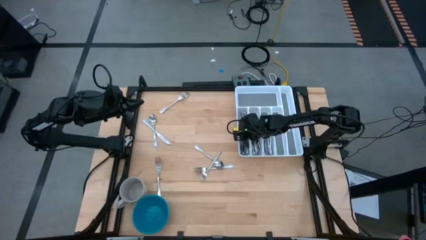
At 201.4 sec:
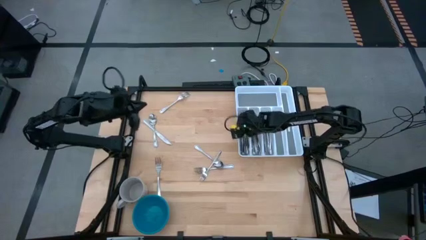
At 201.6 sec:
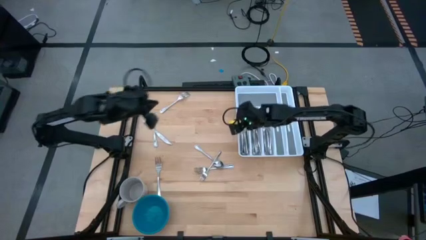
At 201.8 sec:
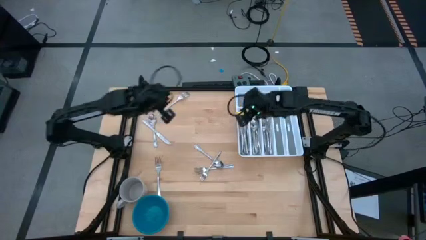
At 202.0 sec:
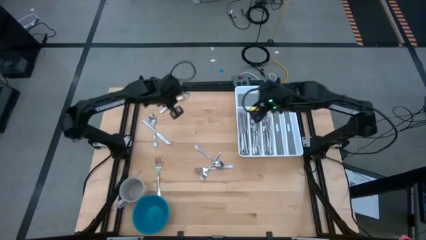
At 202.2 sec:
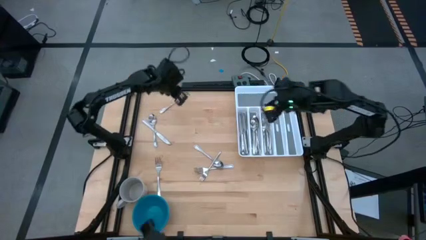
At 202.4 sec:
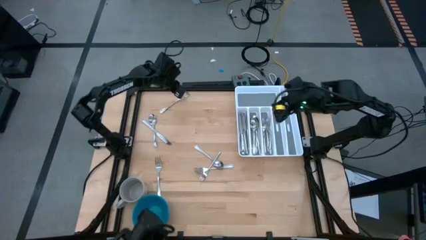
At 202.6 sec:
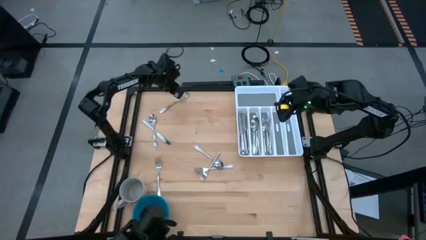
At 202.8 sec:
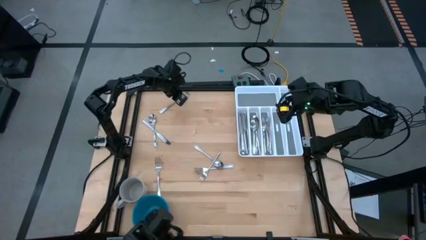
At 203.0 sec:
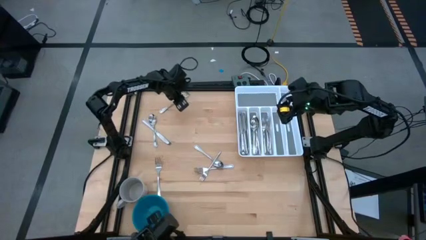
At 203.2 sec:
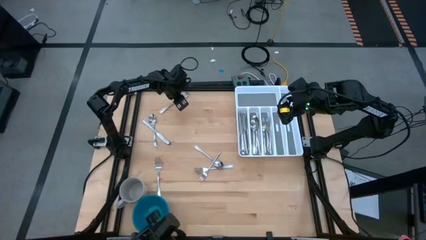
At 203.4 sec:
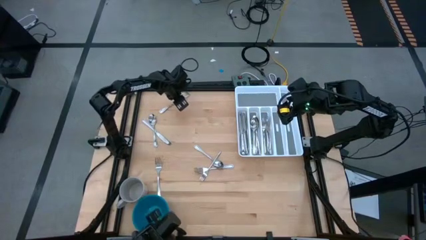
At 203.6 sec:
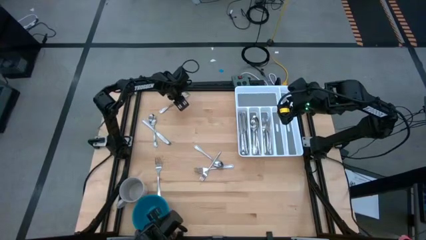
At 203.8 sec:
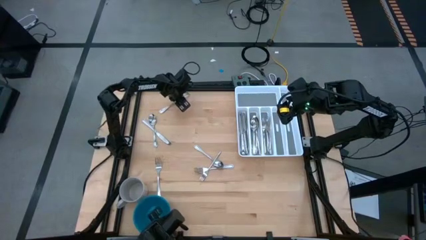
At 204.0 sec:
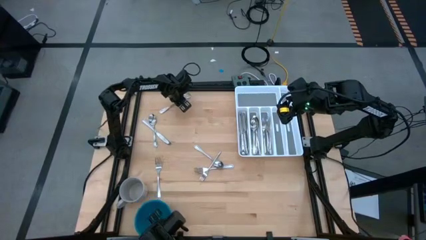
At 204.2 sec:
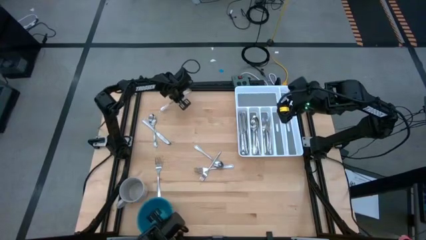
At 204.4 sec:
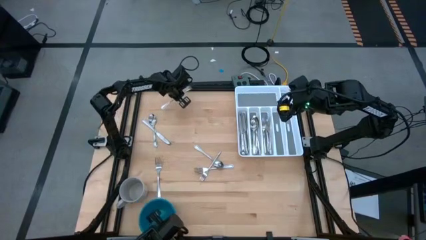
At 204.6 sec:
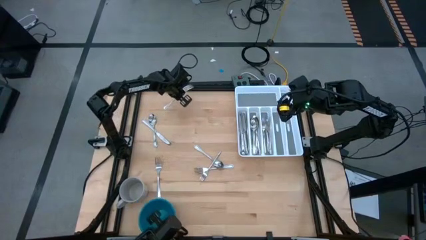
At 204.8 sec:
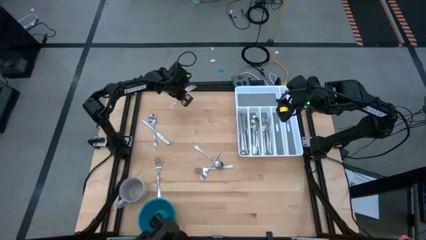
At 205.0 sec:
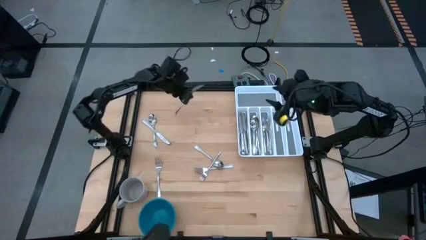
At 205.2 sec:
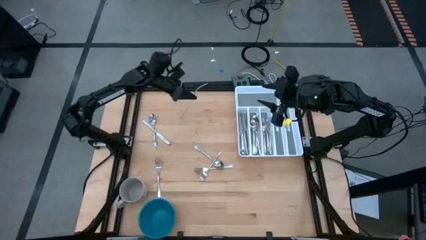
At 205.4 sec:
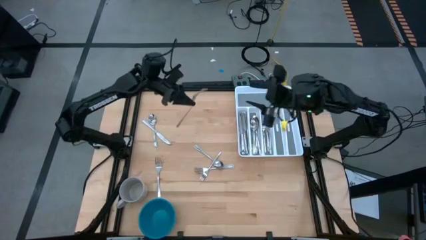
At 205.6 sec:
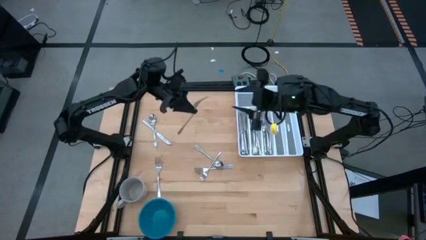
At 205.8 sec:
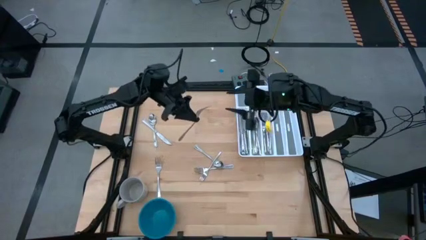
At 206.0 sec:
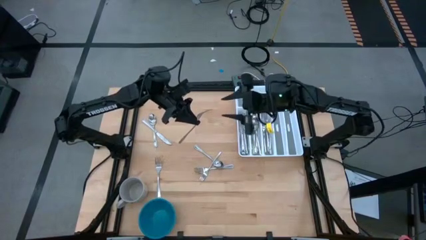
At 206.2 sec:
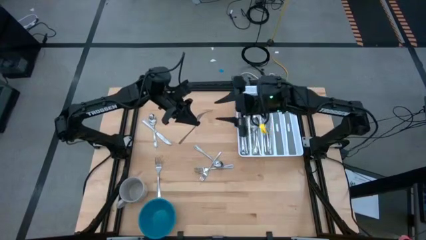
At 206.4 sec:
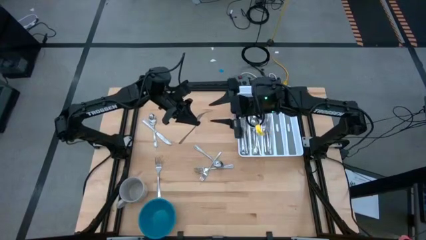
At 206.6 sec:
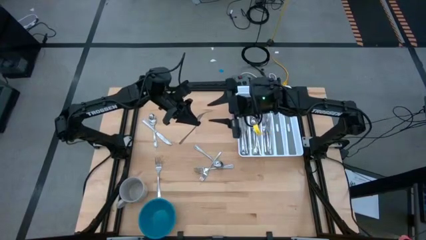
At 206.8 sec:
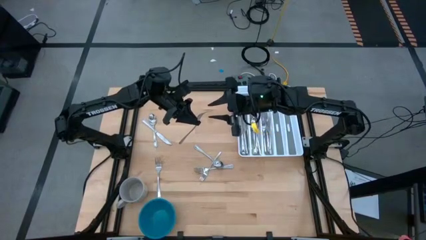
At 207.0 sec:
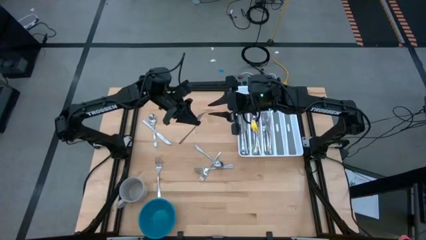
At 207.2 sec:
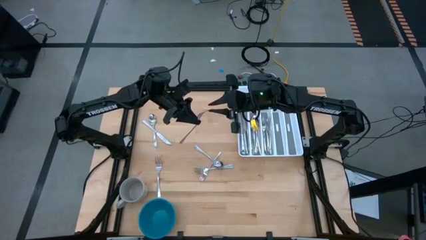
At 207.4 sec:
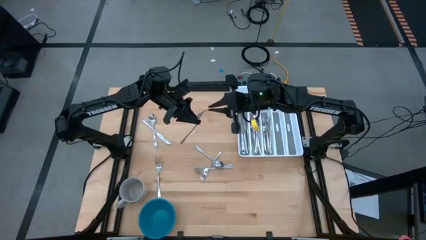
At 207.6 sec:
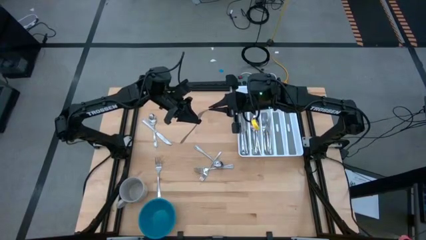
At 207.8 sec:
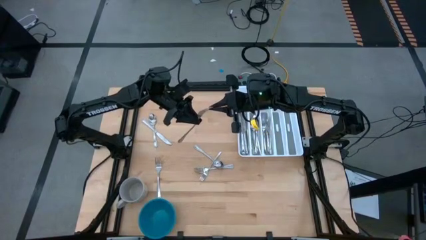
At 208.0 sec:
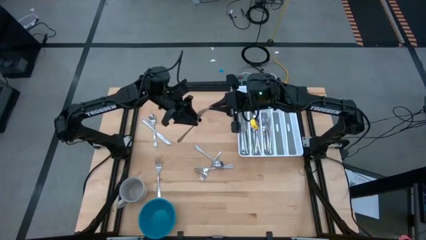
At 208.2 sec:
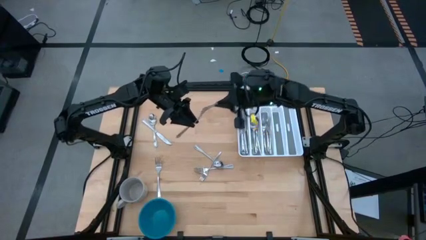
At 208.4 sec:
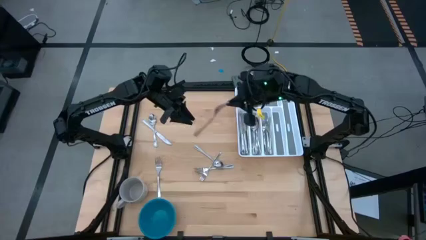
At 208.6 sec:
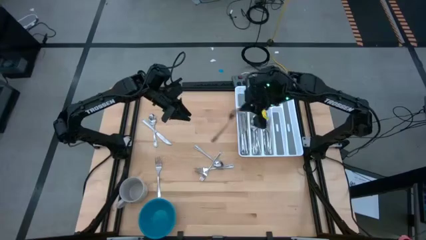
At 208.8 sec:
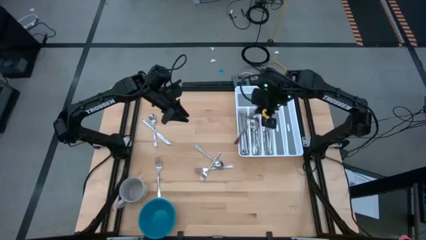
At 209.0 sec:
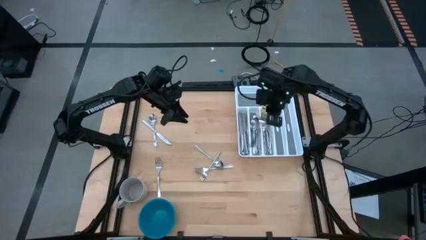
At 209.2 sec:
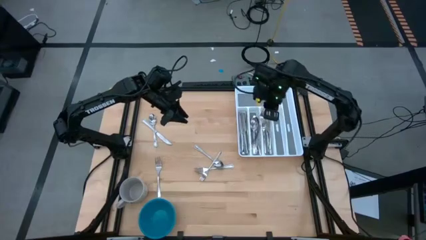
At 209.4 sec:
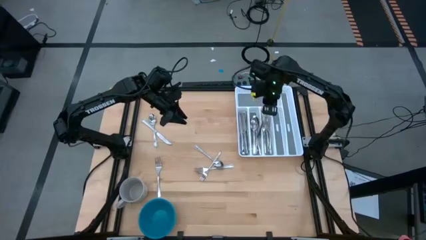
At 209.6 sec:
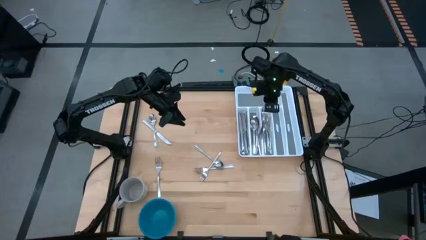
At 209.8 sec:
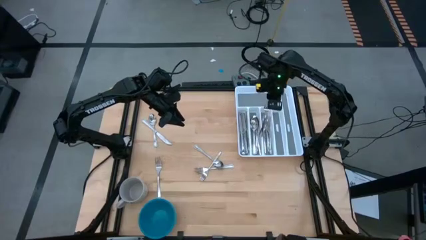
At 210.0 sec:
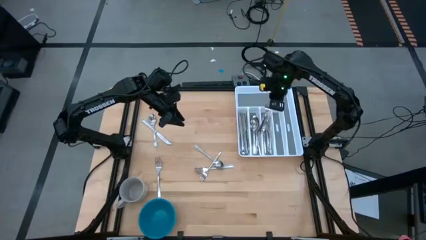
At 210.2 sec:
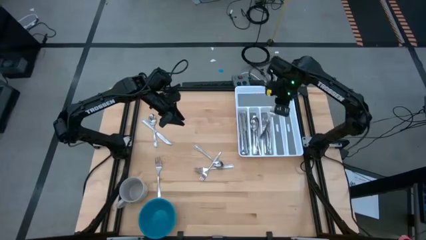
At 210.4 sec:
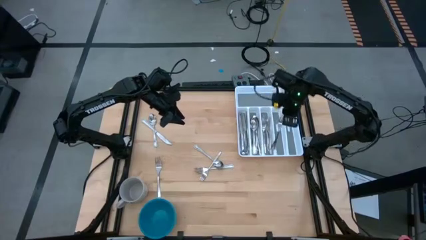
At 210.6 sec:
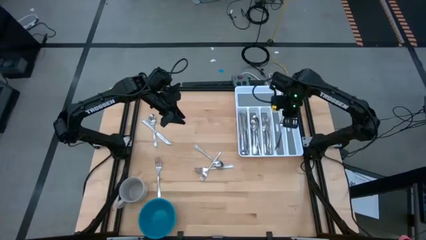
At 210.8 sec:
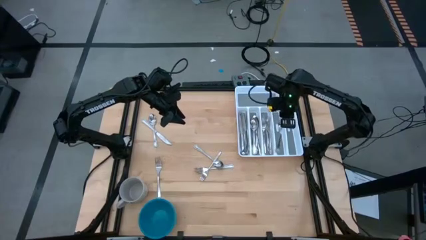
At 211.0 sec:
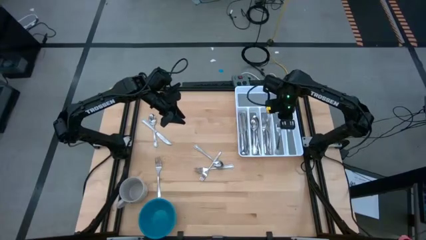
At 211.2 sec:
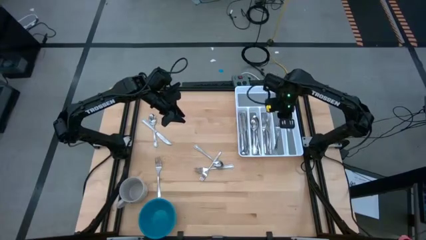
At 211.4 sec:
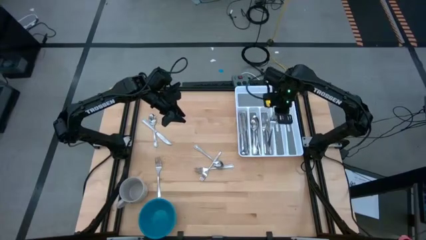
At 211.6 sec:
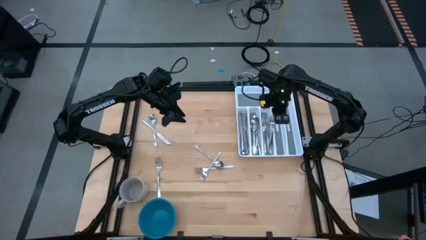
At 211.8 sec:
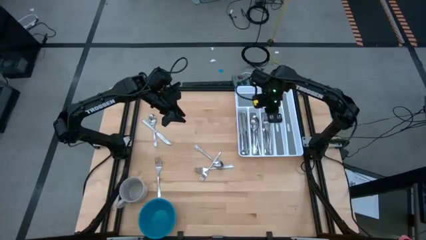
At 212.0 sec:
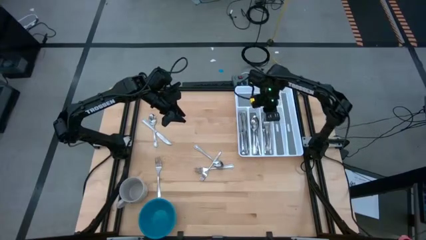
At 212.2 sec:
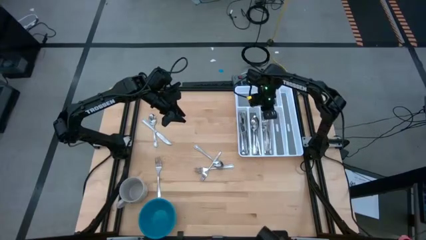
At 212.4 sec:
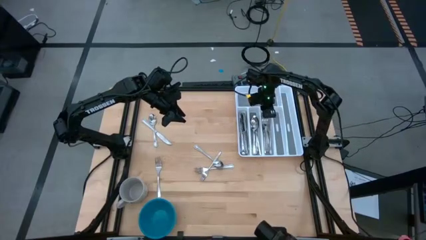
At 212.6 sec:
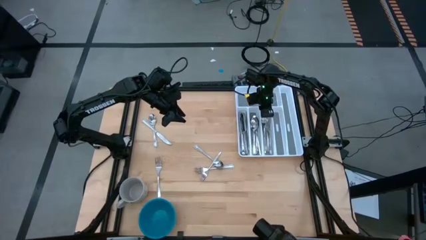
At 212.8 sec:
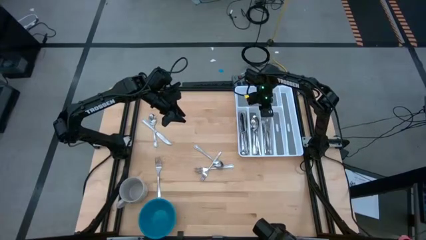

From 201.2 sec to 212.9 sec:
Task: Sort silverware
Put the fork into the silverware tray

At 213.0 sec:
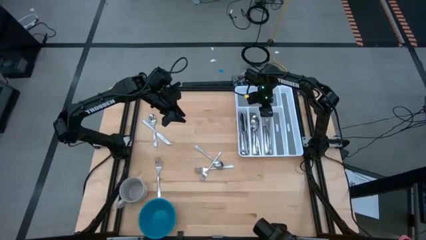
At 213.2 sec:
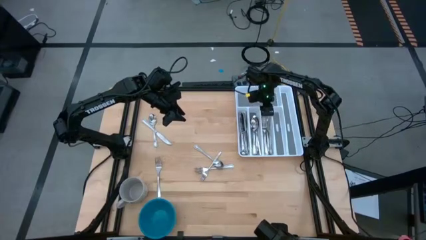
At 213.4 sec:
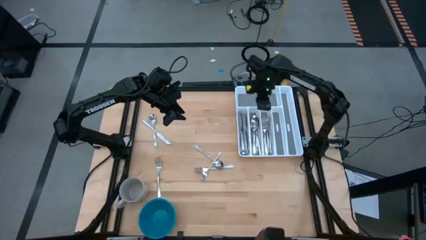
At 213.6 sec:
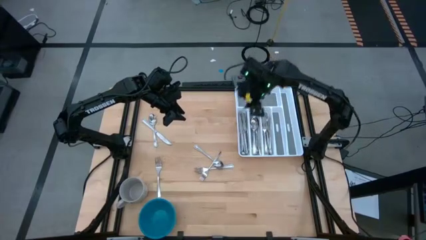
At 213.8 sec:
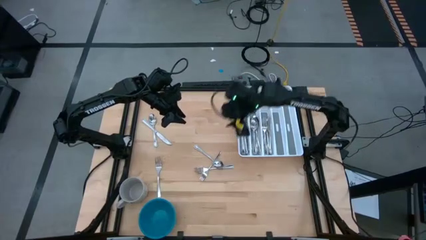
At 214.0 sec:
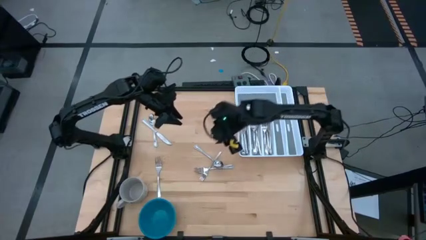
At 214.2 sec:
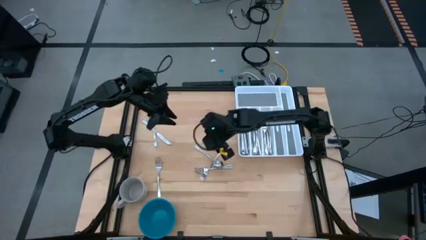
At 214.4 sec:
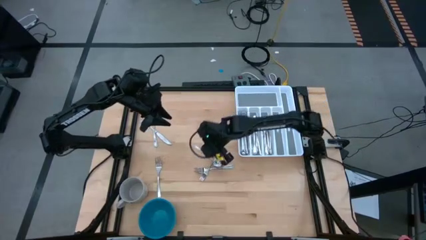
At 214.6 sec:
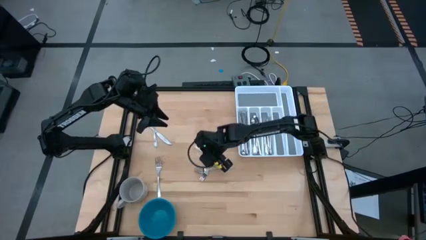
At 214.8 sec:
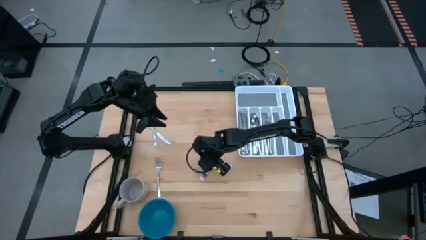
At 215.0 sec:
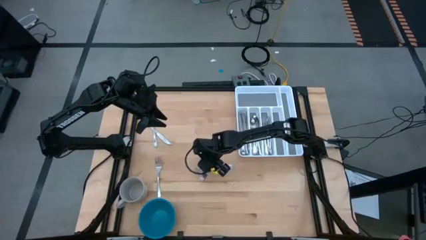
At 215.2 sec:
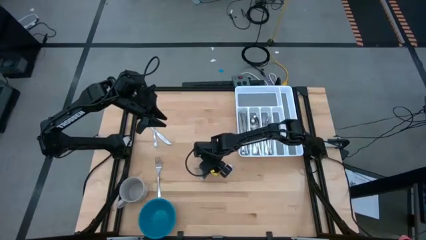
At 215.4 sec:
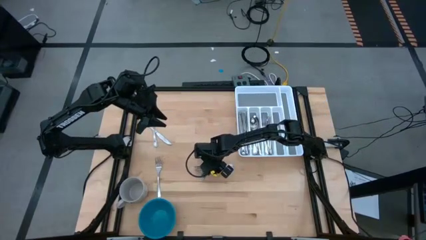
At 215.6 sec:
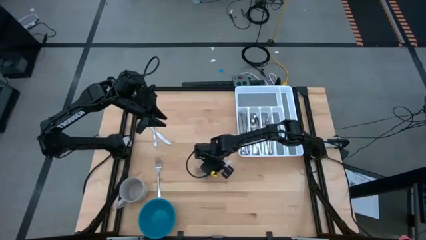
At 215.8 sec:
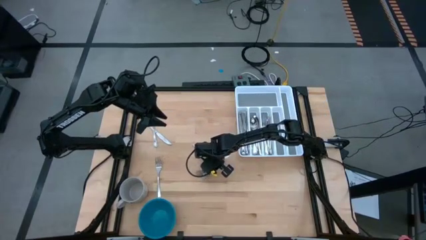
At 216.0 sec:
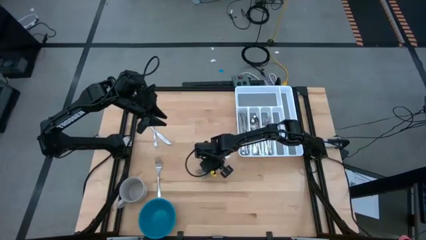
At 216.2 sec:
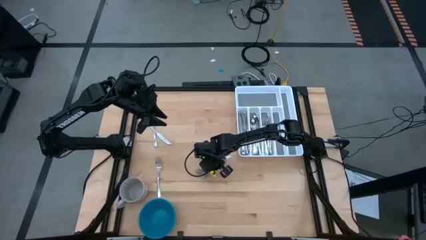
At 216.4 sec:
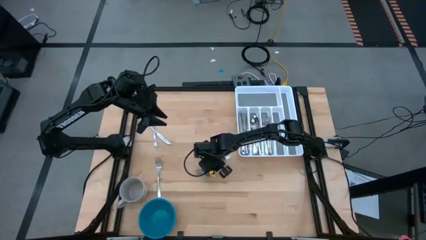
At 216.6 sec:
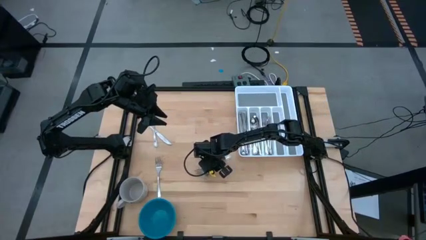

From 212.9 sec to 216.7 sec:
Put the fork into the silverware tray
